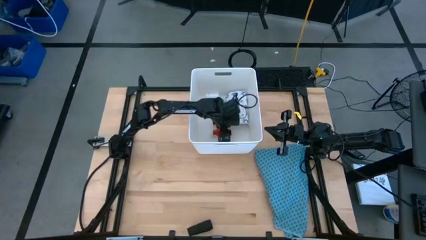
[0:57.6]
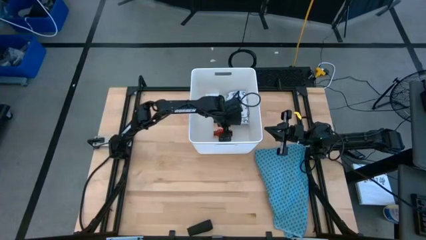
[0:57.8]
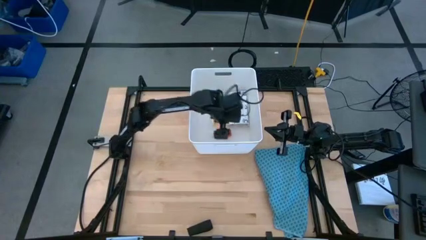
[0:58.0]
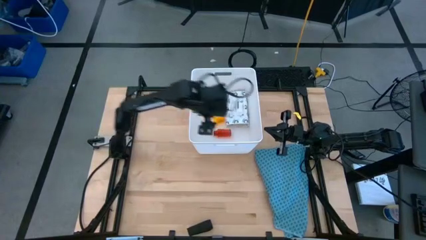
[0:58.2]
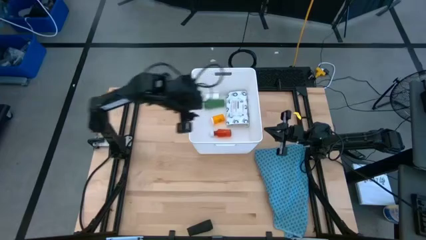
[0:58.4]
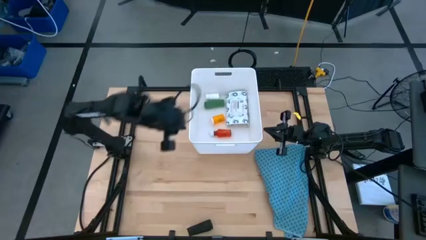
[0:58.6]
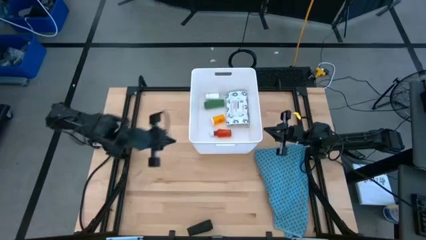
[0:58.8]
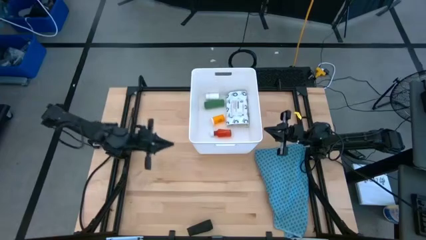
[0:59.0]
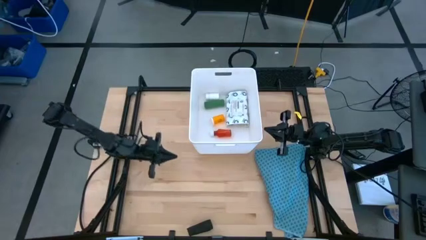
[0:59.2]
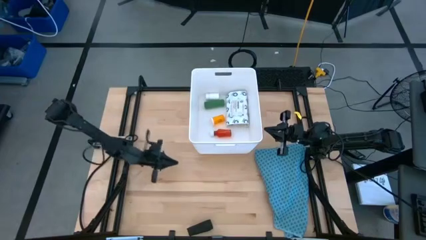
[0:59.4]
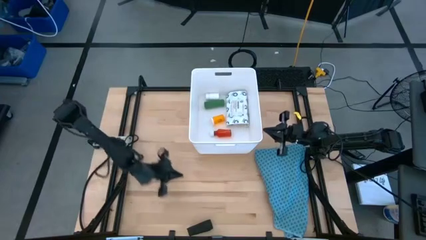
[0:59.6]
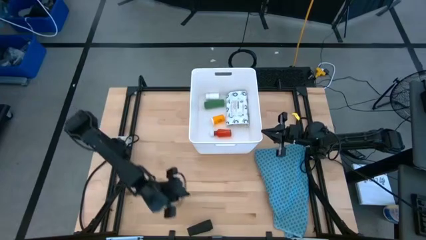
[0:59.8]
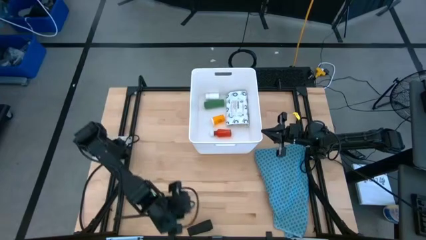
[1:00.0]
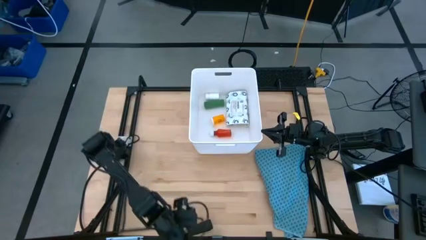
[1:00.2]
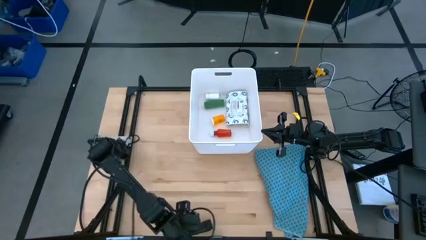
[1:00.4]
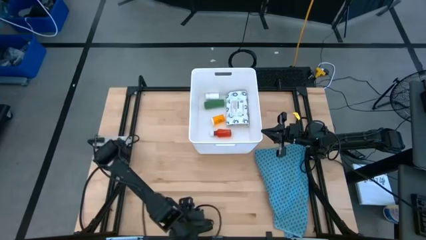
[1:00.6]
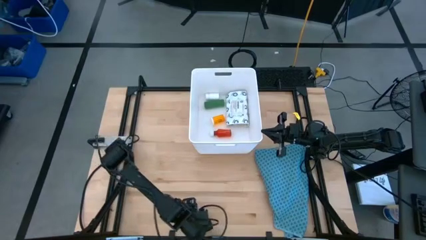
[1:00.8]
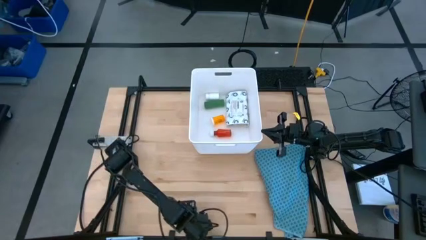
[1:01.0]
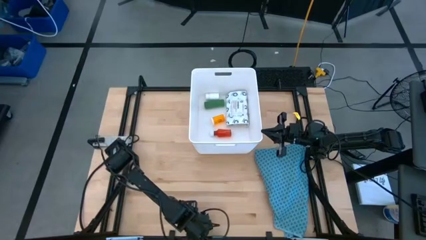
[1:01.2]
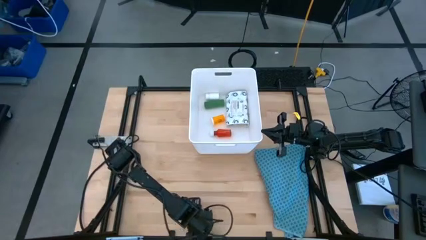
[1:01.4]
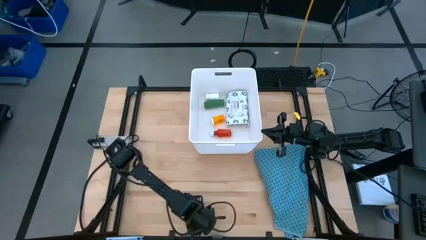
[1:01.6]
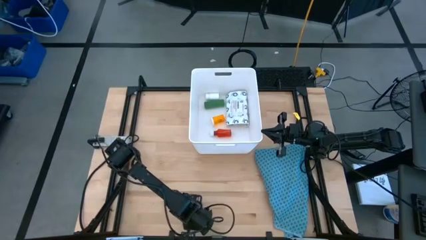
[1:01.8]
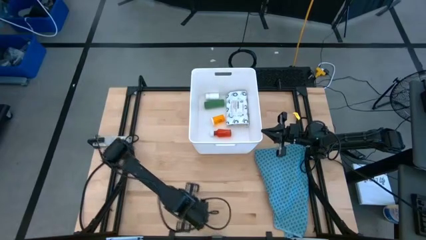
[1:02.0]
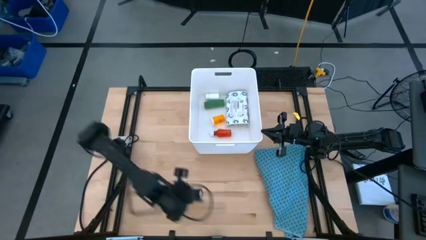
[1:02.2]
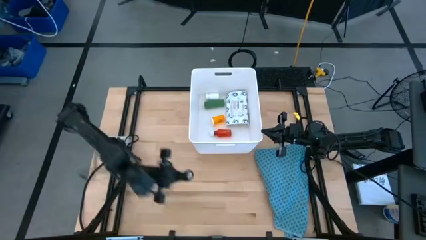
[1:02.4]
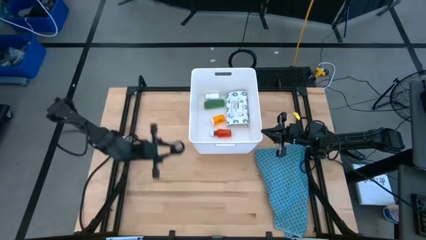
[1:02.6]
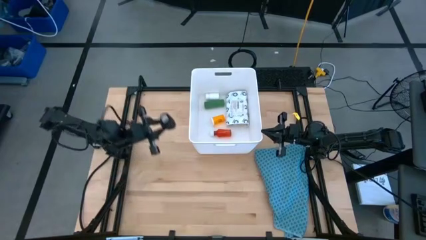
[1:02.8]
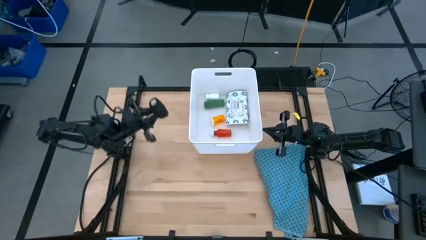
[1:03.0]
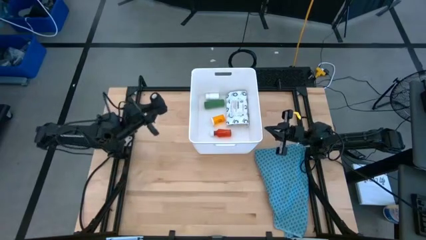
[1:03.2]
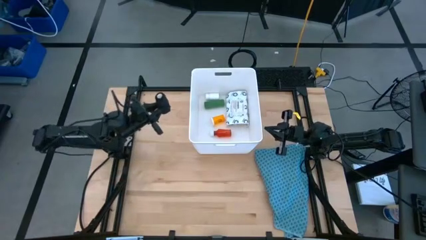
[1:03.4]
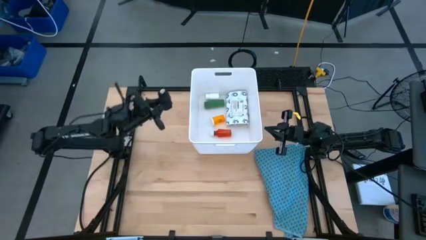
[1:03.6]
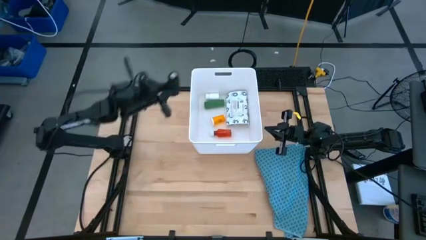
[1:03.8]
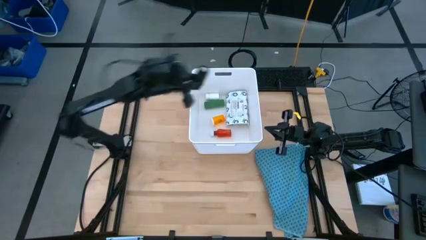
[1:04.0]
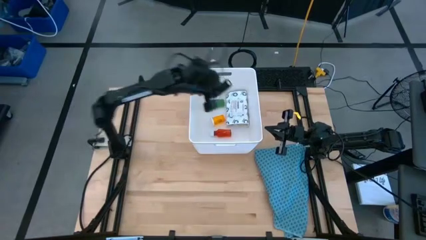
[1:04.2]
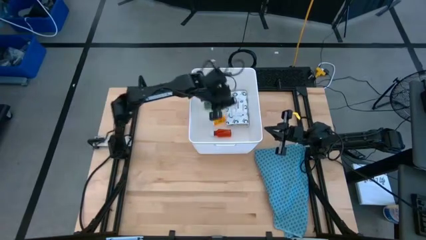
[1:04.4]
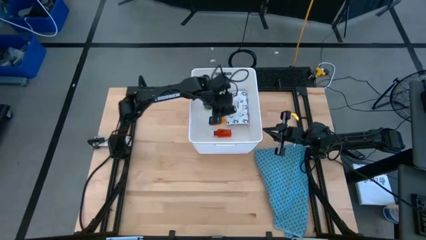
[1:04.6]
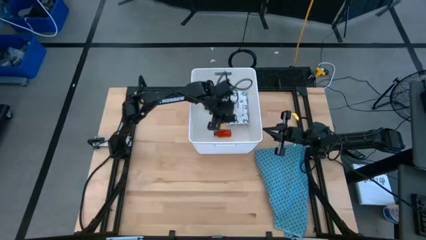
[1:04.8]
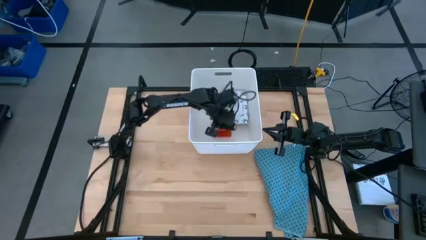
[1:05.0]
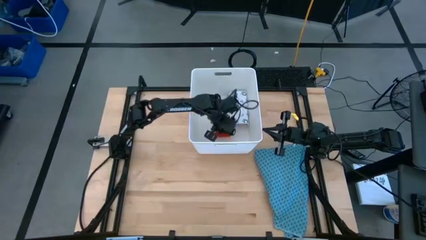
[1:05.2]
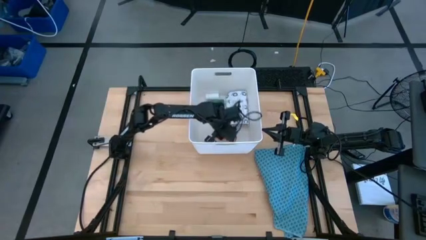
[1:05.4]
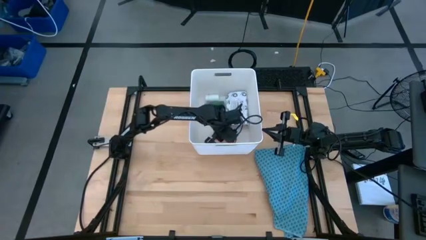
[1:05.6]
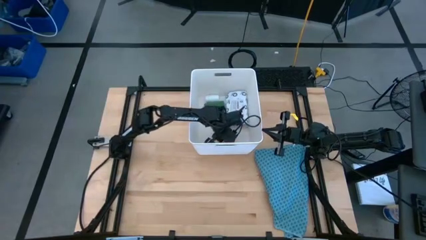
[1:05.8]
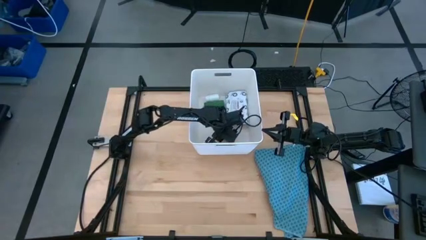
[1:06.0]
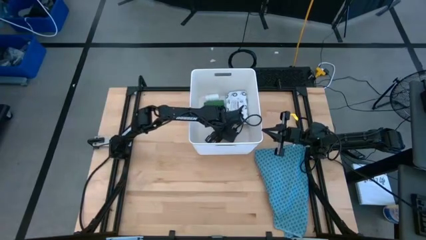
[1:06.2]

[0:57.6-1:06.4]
Task: Pick & place medical supplies in basket/bin
Put the black bandage into the white bin

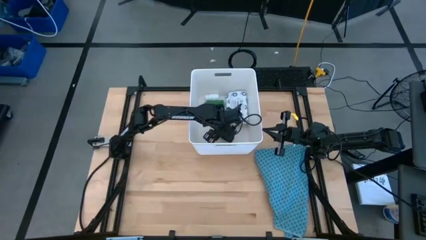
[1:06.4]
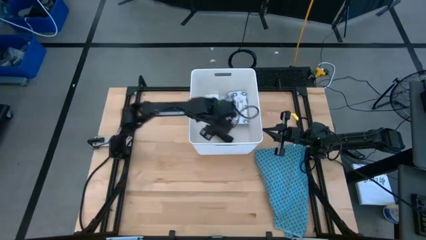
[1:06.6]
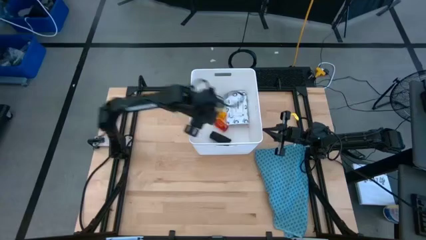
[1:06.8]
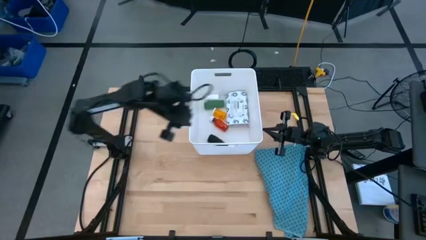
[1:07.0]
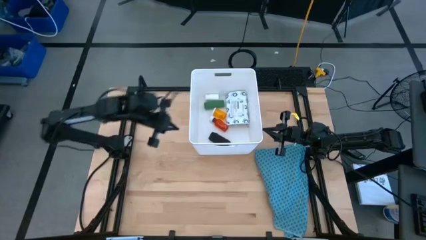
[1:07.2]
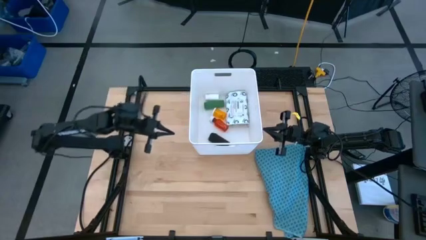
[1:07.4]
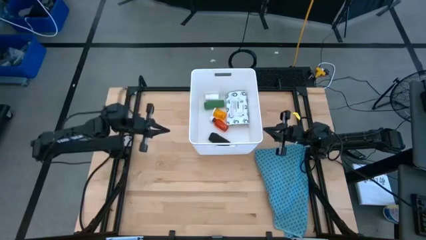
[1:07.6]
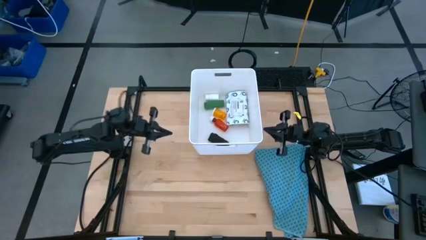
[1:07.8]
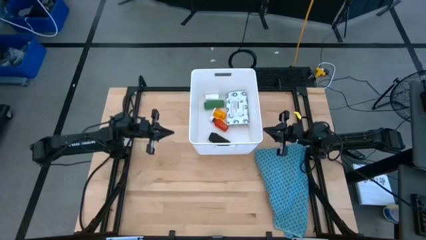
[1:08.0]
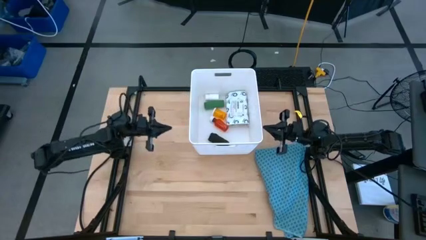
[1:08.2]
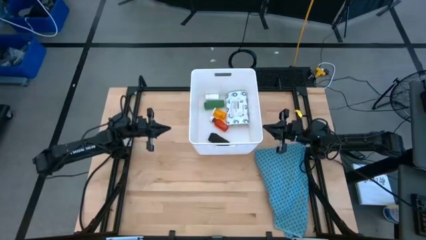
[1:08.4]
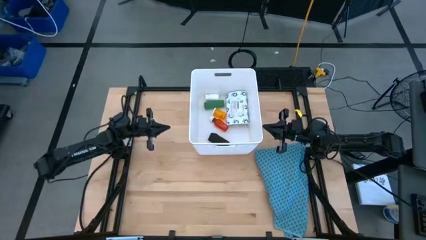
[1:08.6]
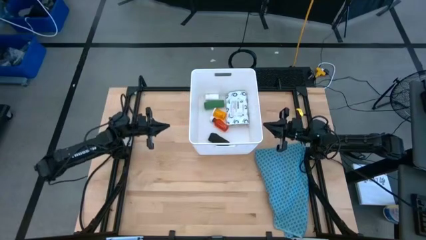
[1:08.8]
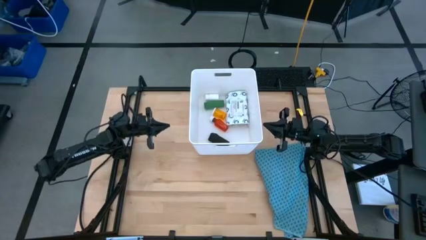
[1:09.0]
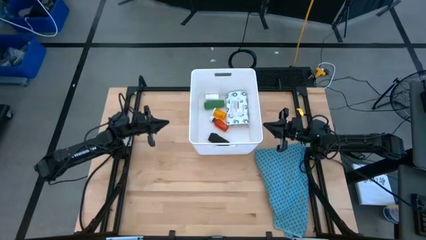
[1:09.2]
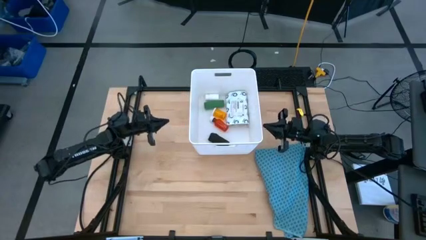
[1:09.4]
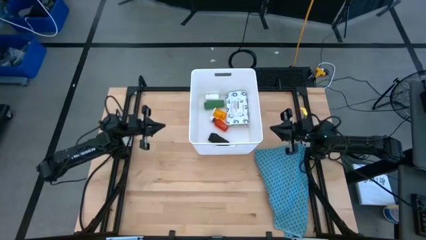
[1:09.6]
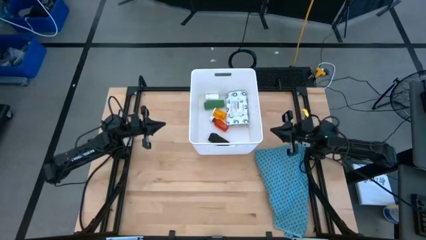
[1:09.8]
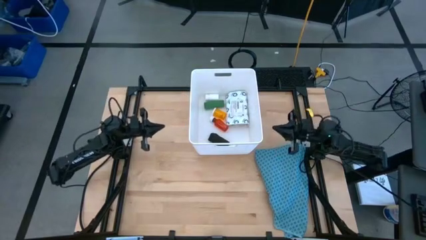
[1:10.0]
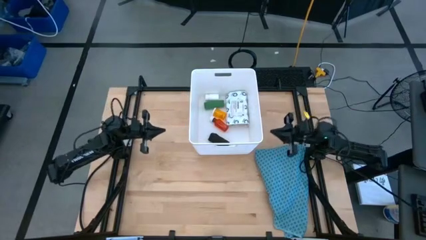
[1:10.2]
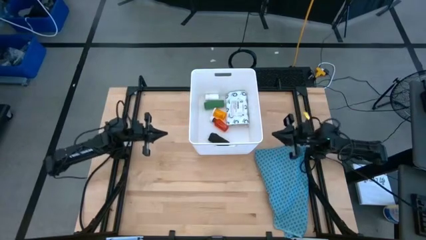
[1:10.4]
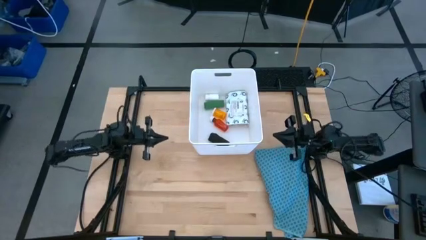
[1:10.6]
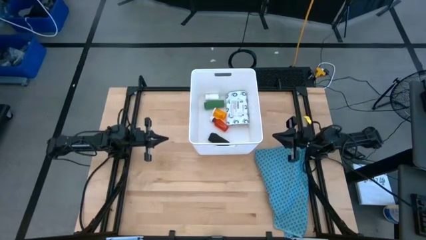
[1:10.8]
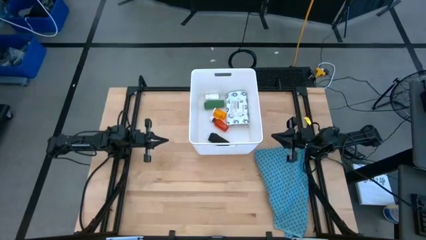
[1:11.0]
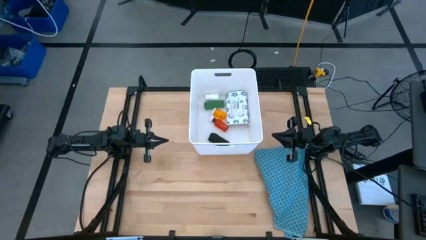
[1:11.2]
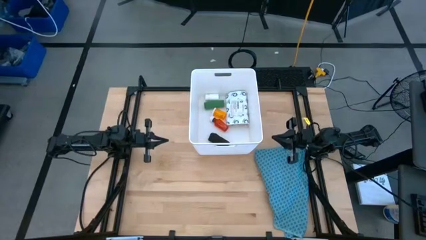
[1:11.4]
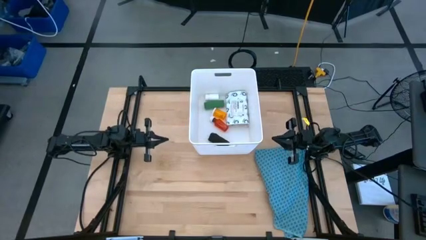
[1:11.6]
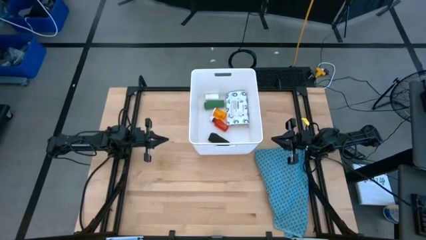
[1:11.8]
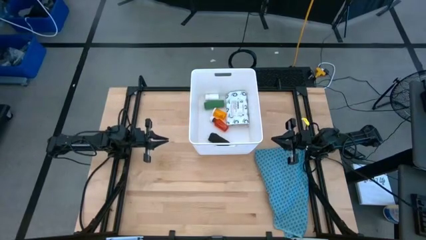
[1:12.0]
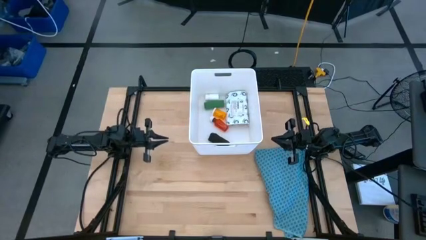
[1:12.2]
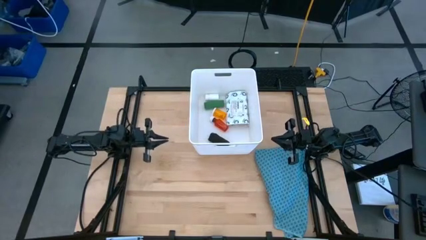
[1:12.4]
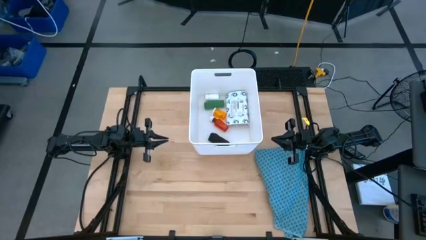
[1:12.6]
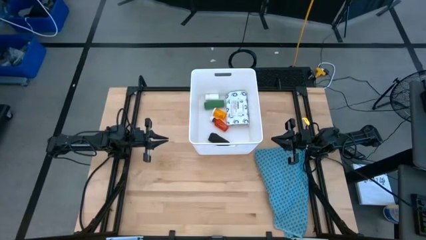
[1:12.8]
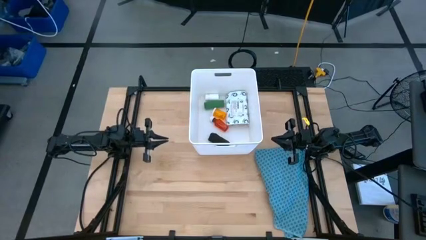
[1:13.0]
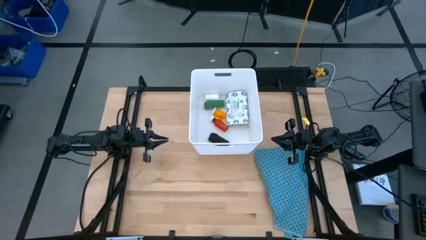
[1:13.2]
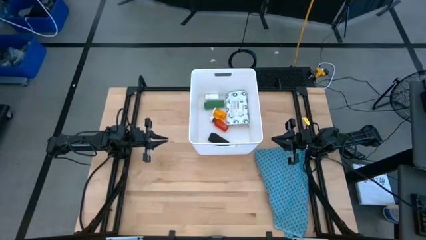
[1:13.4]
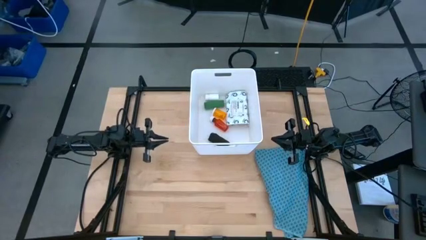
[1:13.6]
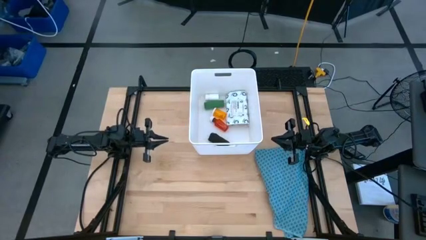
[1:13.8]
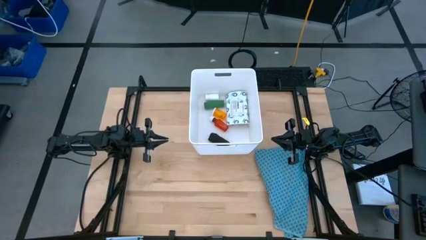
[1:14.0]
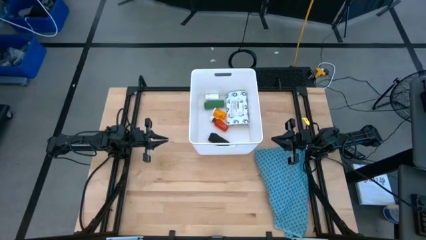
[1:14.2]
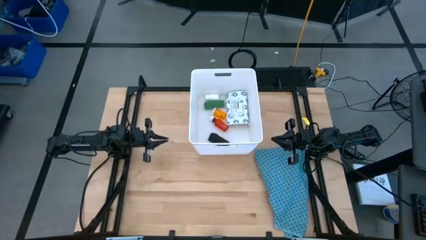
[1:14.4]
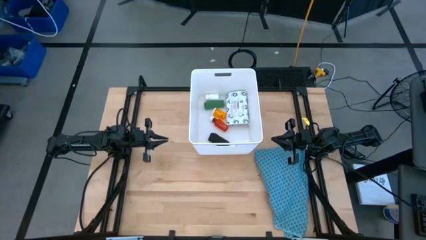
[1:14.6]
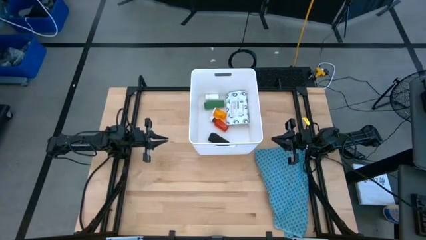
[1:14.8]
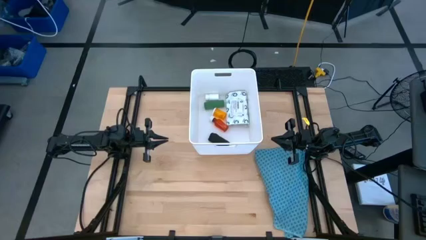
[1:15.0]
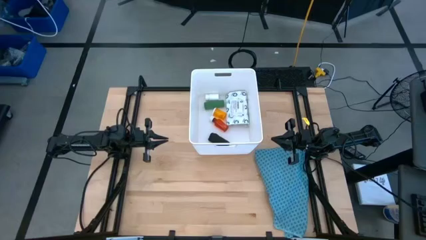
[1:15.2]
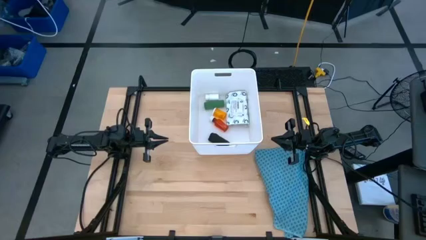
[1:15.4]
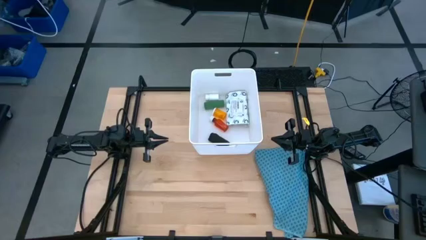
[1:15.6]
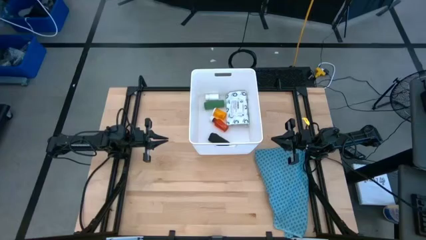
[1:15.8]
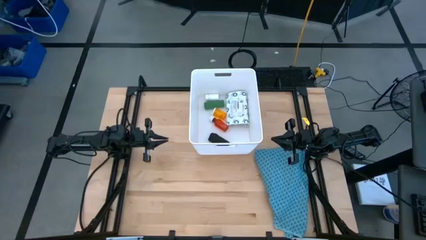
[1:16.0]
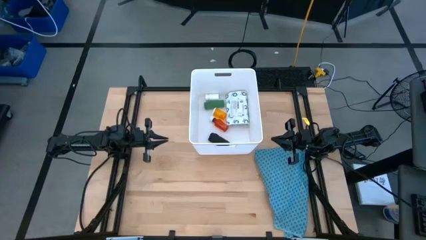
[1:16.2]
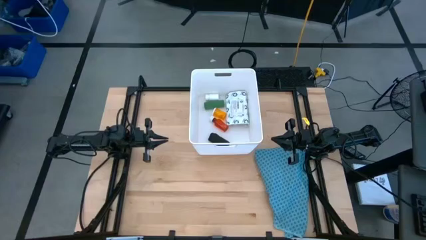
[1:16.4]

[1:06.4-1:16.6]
Return to Home Position
